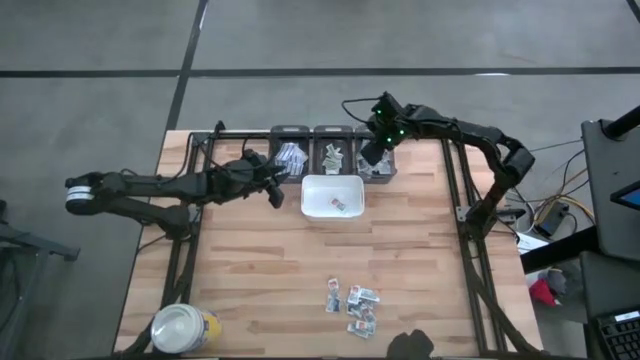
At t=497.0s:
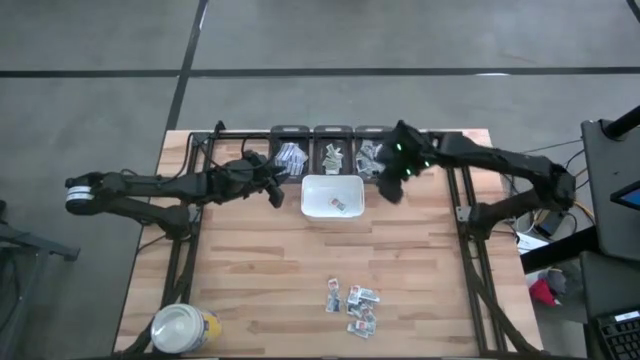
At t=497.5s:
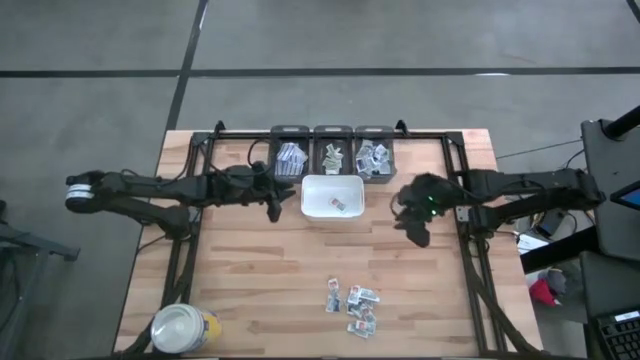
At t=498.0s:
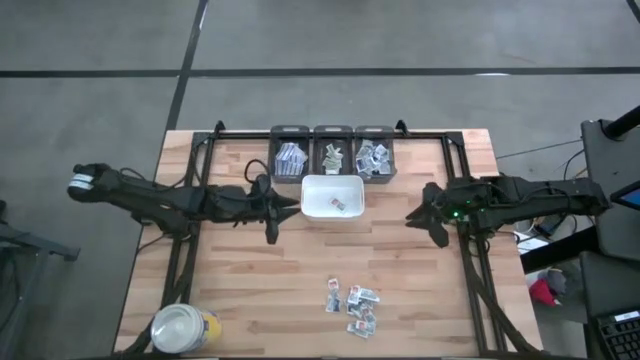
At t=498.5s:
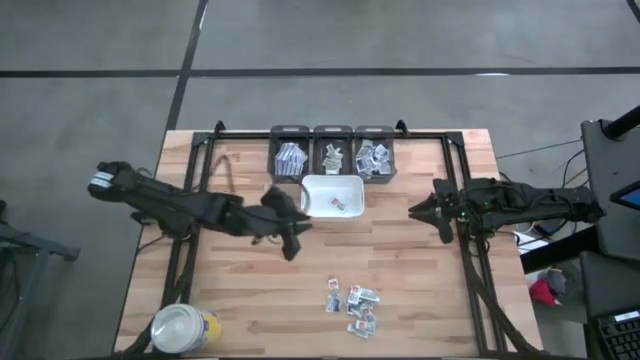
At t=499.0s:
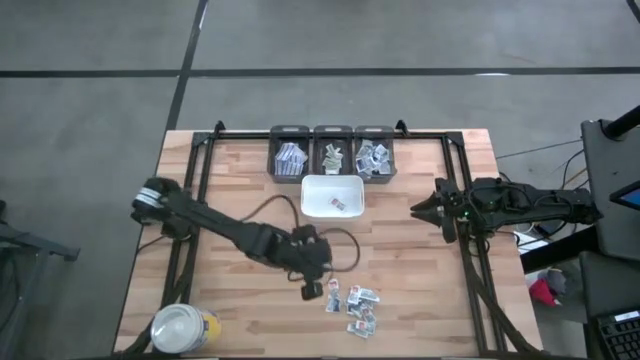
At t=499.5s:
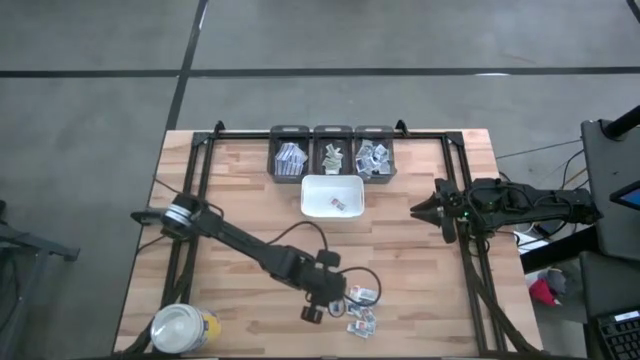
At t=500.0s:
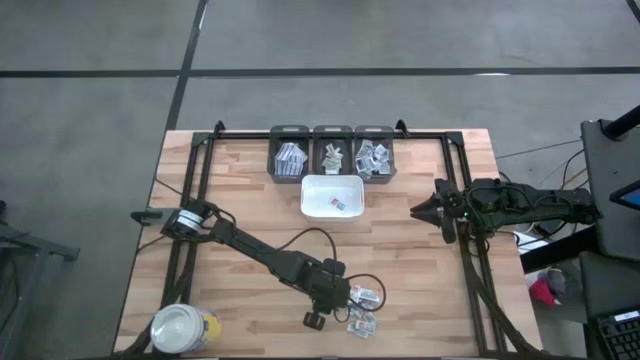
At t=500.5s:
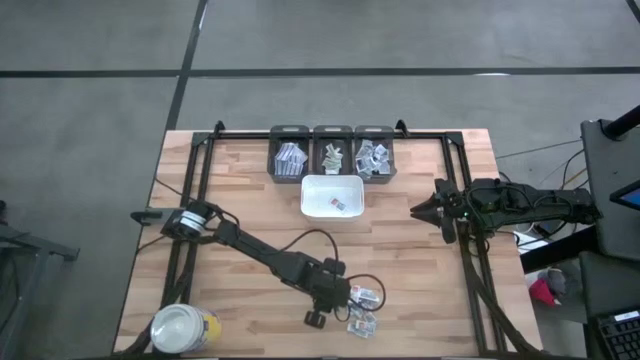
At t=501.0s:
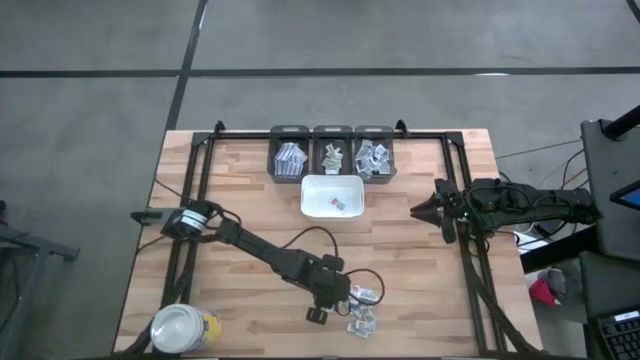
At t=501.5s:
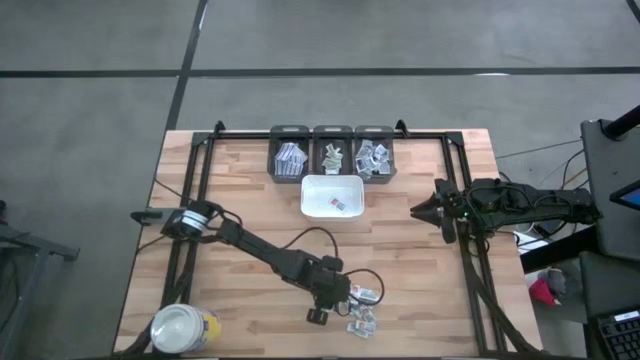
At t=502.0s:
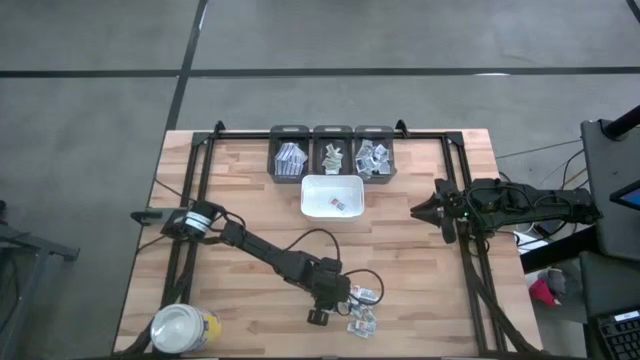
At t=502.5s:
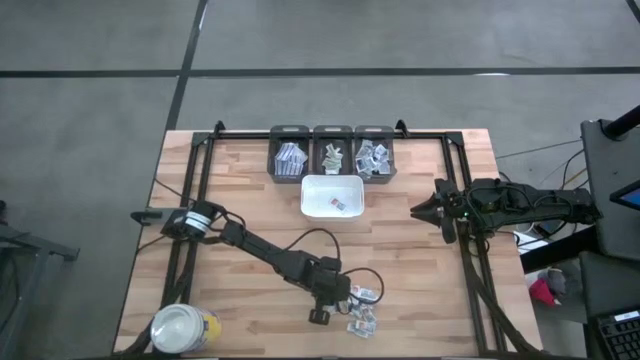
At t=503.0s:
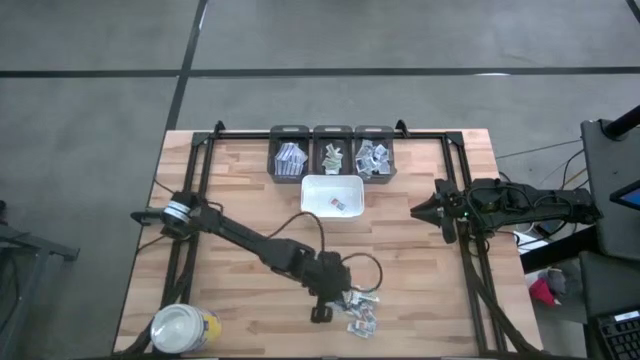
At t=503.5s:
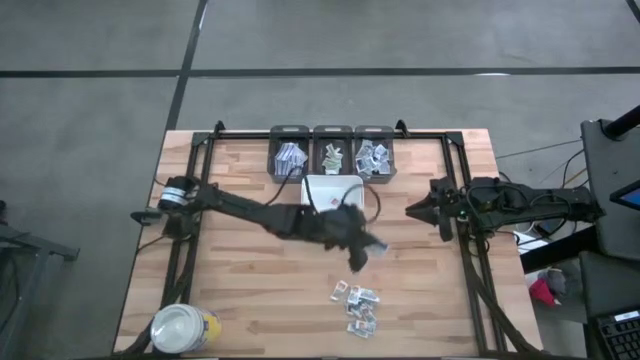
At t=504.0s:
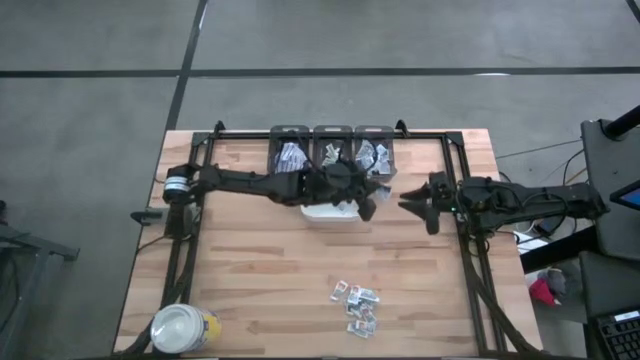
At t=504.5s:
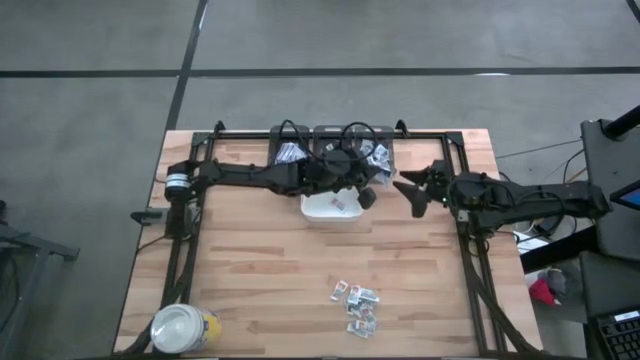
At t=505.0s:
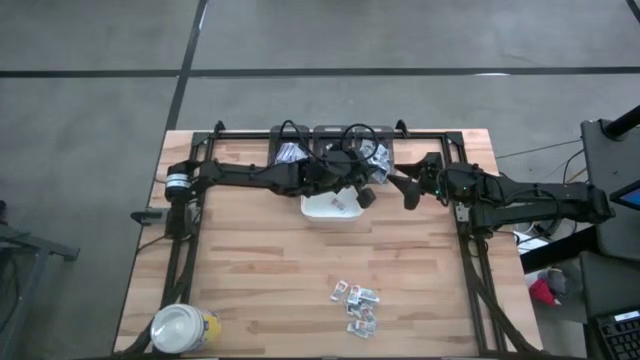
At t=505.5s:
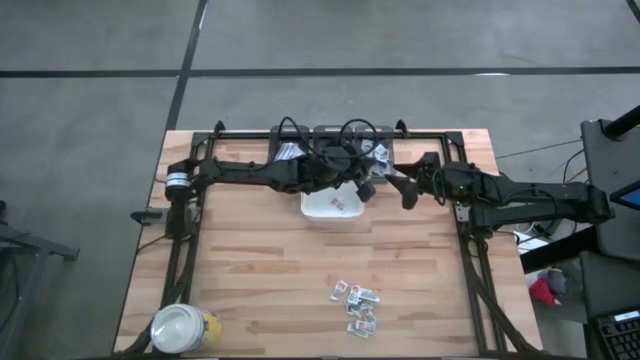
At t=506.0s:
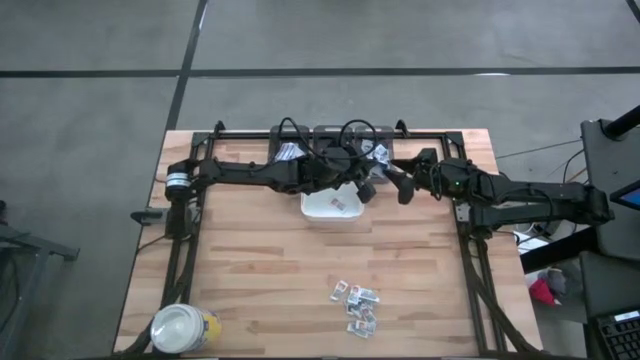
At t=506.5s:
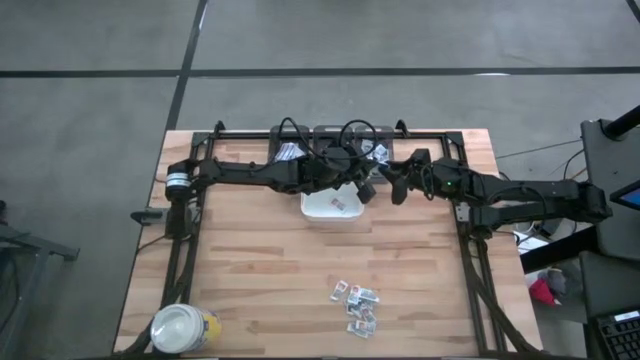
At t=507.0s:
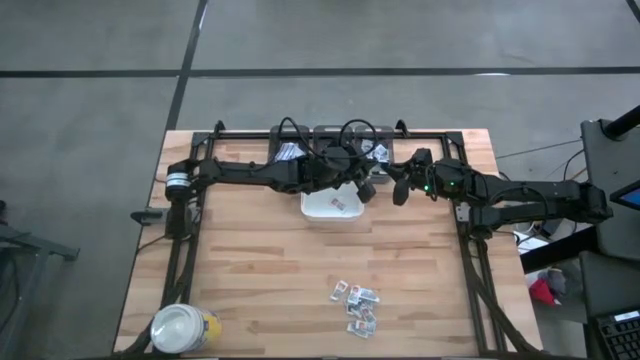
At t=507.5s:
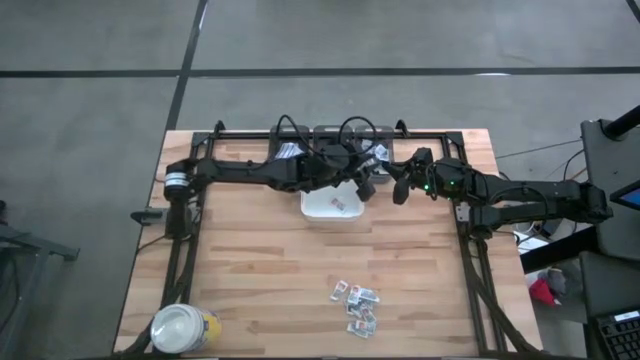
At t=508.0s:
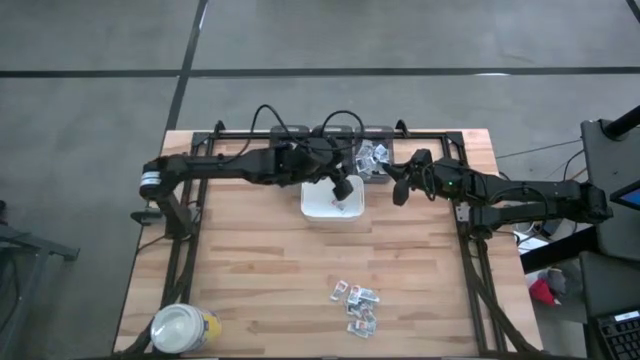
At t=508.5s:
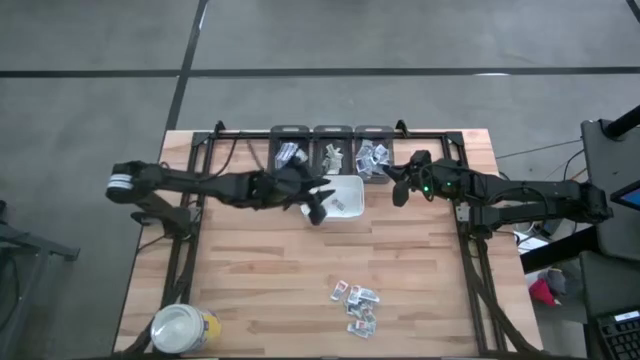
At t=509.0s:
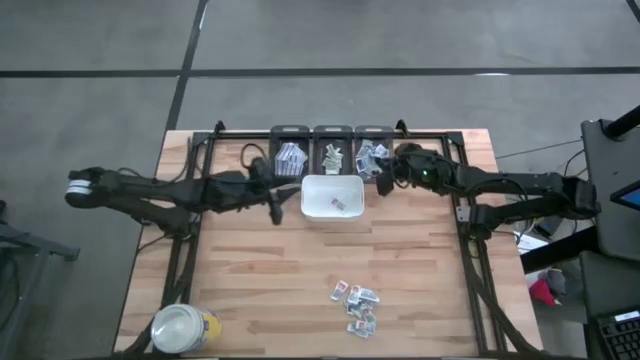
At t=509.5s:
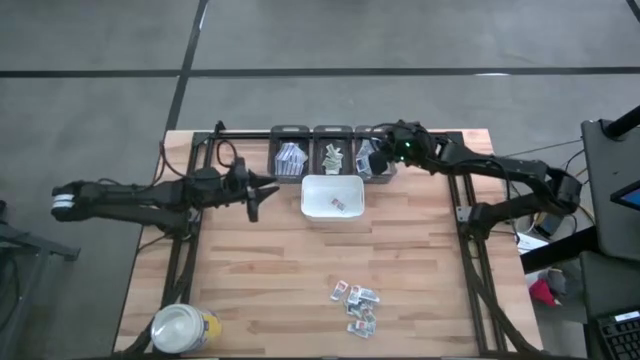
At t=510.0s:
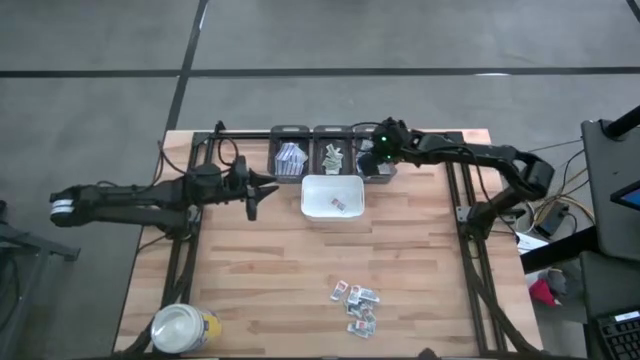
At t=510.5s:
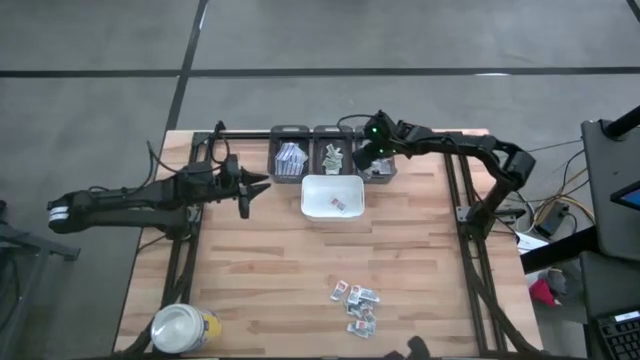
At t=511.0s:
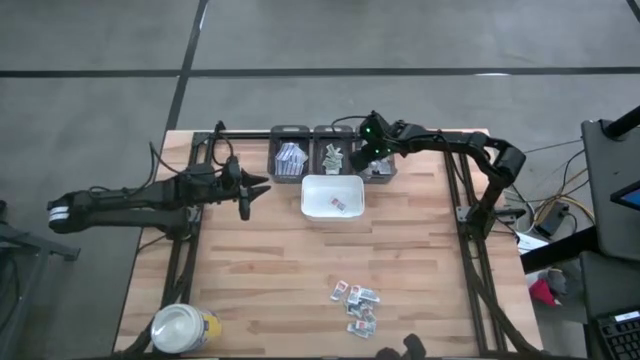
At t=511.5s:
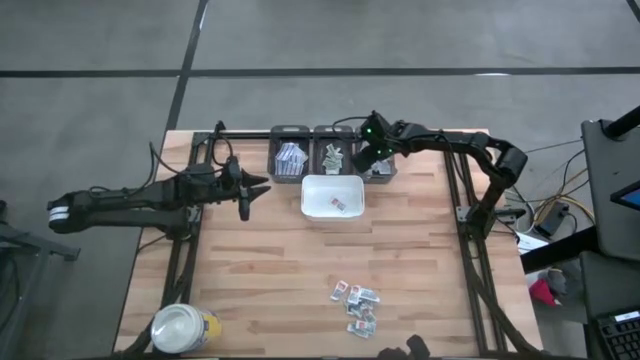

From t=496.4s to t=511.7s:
Task: Pick & Place First Aid Supplies
Put the white alcohol pad into the right black bin

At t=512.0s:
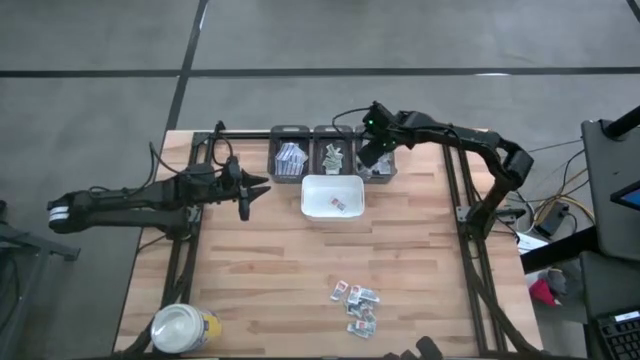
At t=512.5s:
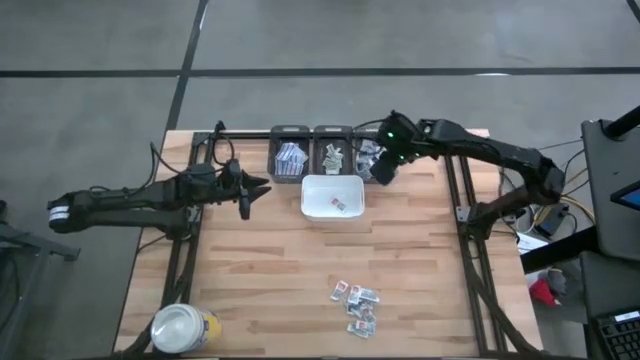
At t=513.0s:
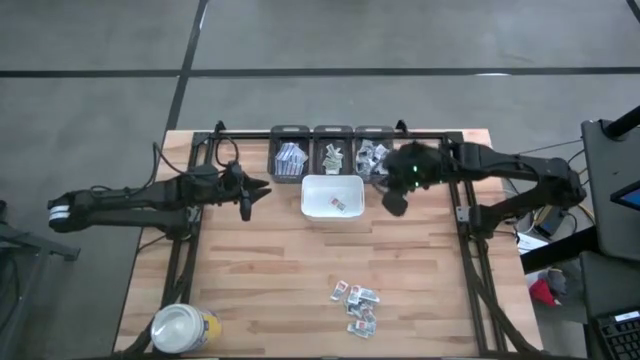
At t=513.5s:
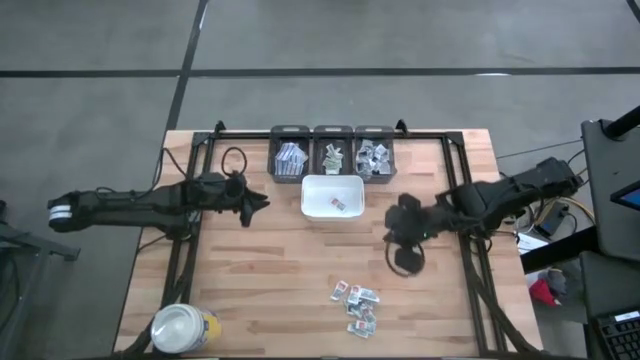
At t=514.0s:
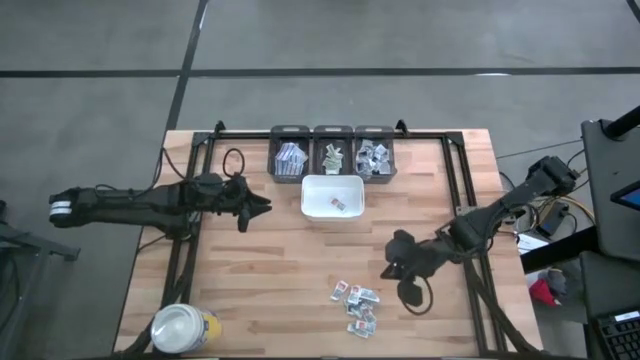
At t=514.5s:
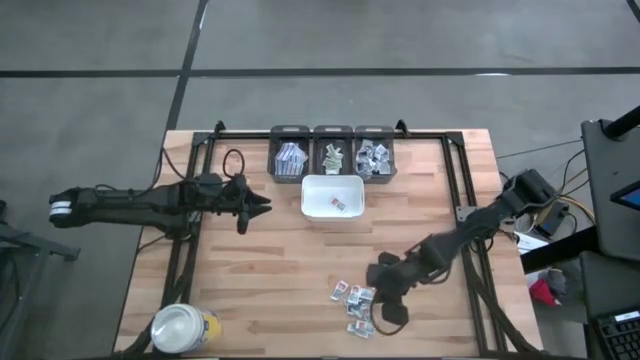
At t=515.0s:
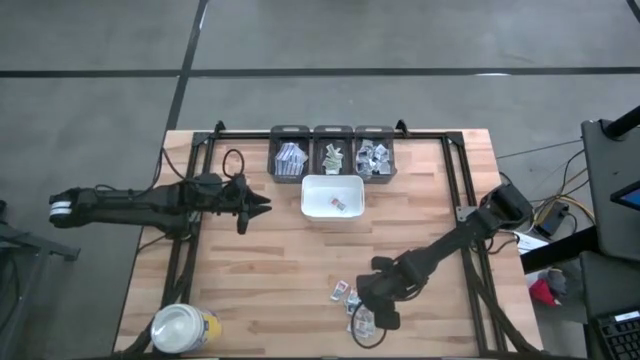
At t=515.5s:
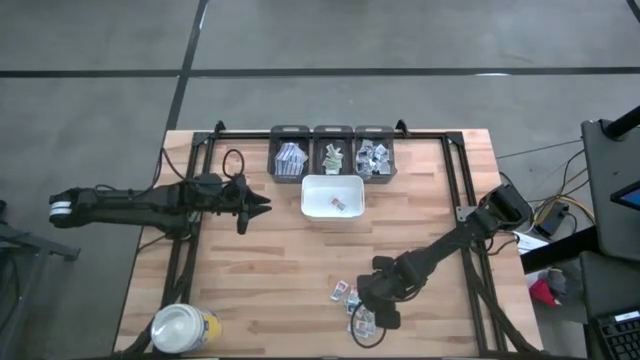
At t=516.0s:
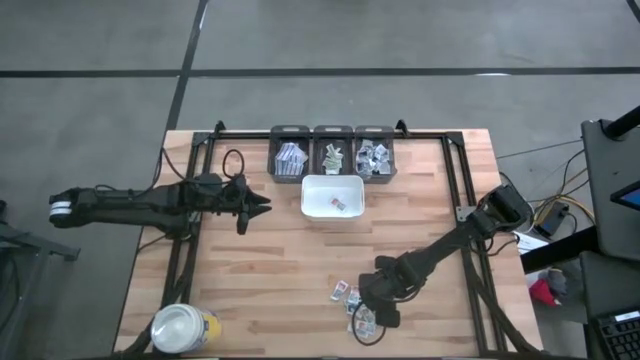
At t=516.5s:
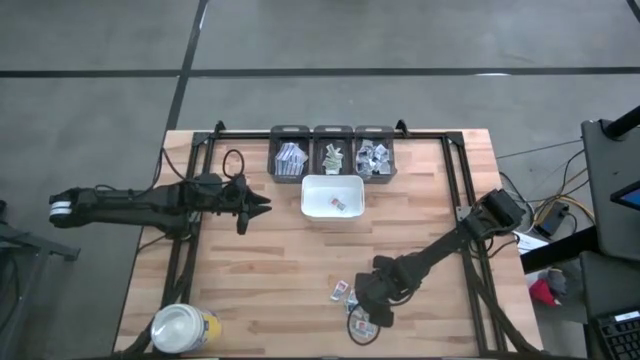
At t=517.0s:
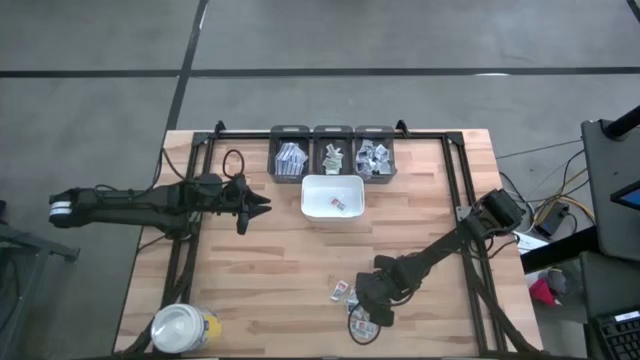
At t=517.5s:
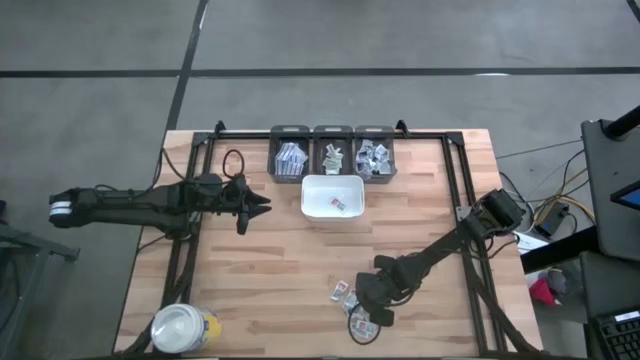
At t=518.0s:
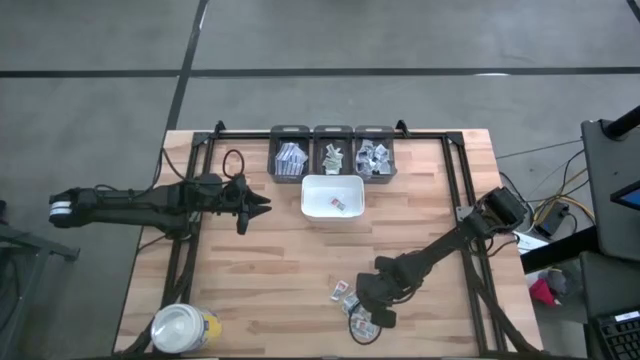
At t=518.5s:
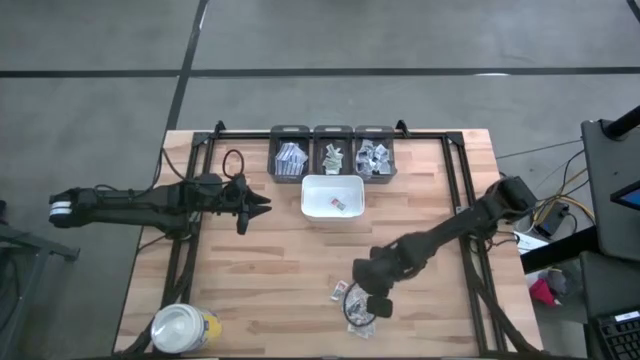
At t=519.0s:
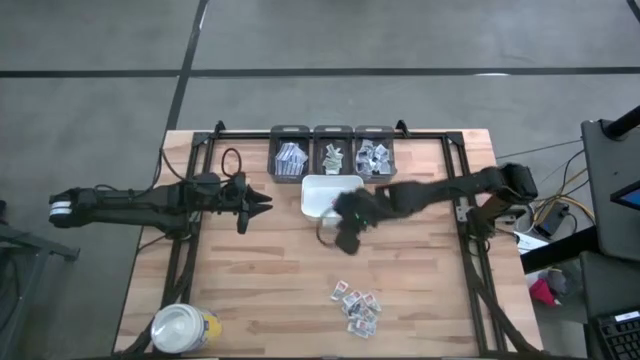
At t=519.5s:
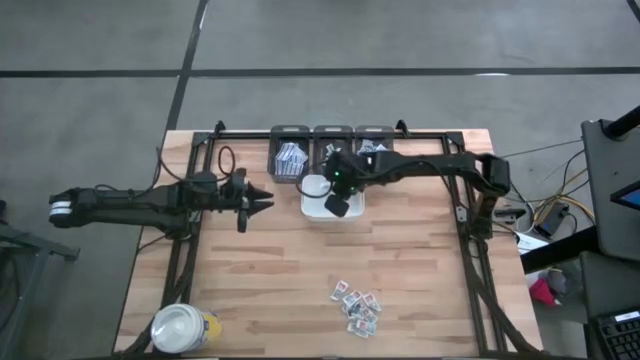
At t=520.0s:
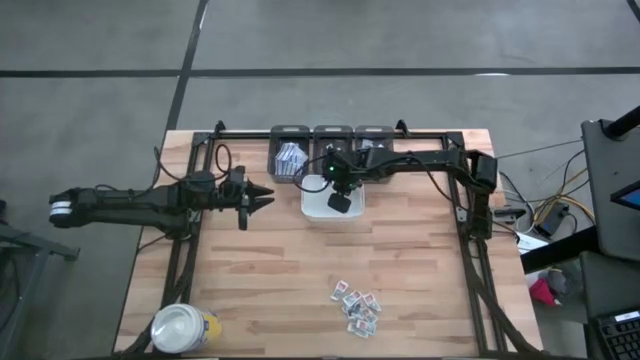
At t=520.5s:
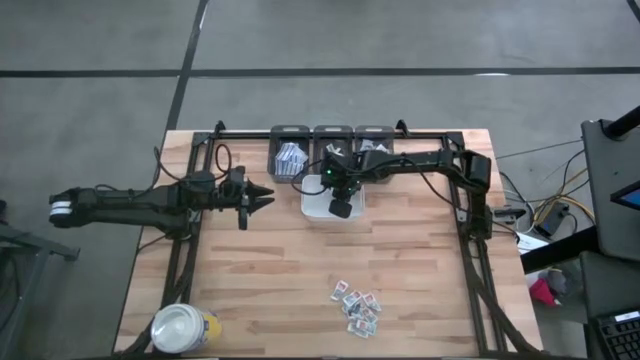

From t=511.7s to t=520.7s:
Put the orange ointment pack into the white bin
